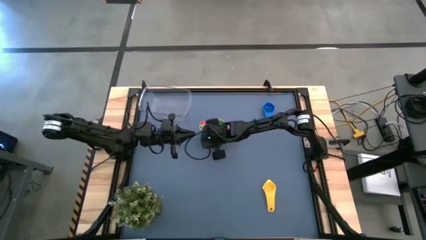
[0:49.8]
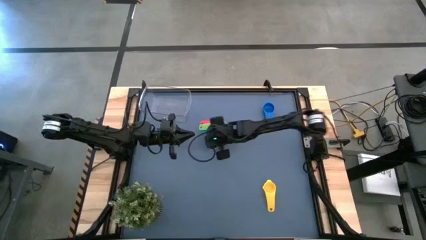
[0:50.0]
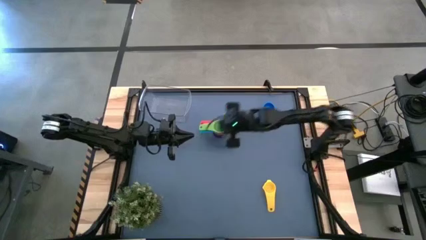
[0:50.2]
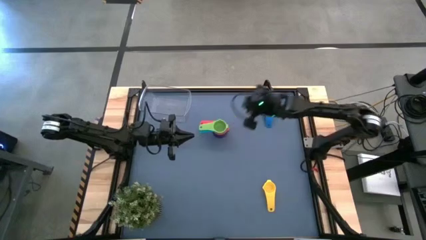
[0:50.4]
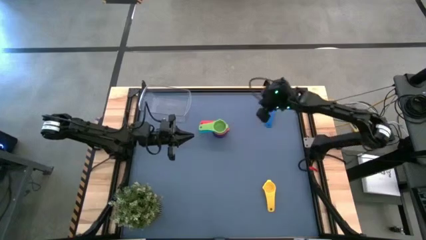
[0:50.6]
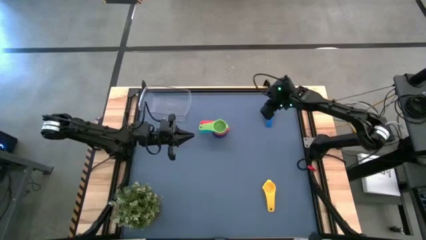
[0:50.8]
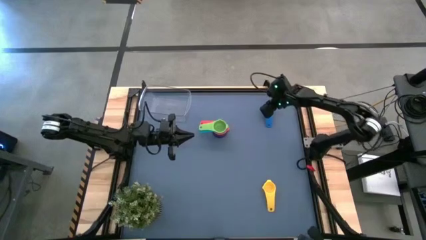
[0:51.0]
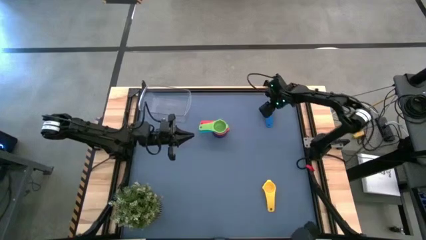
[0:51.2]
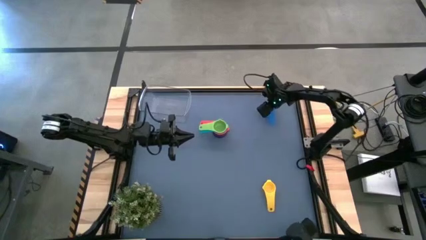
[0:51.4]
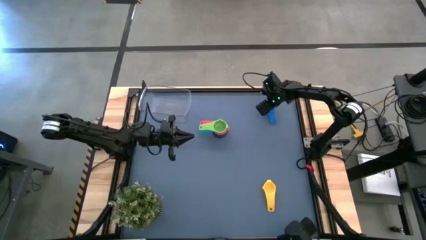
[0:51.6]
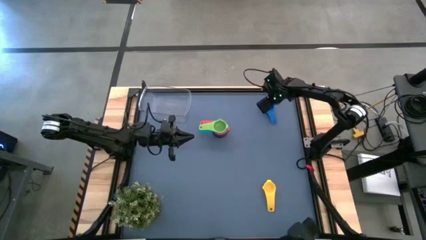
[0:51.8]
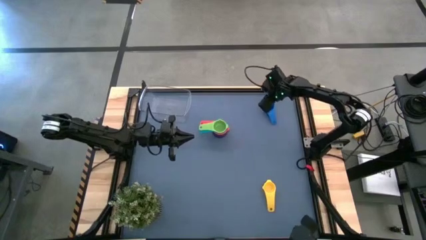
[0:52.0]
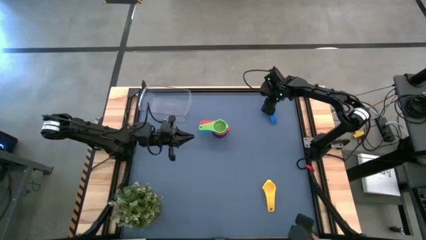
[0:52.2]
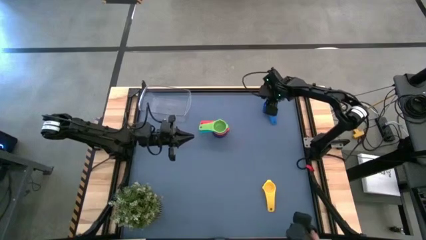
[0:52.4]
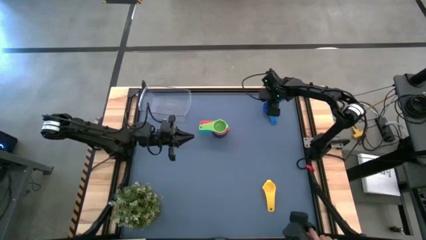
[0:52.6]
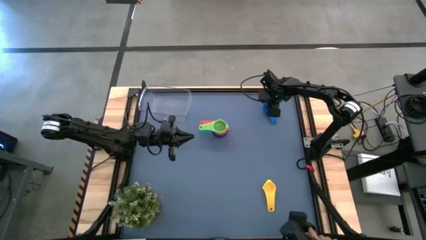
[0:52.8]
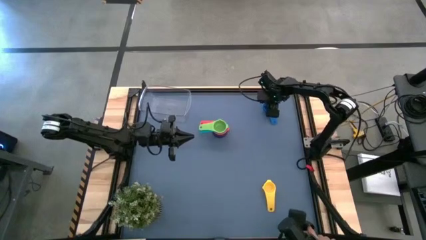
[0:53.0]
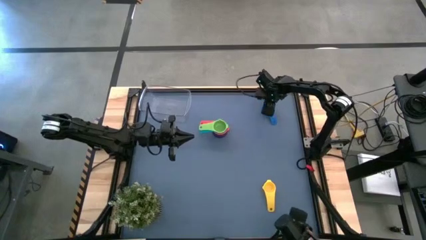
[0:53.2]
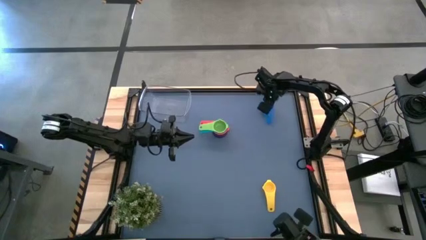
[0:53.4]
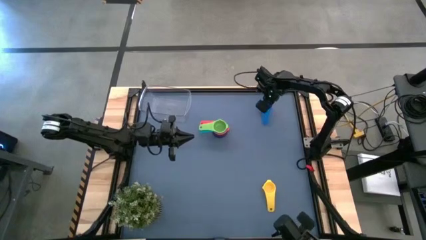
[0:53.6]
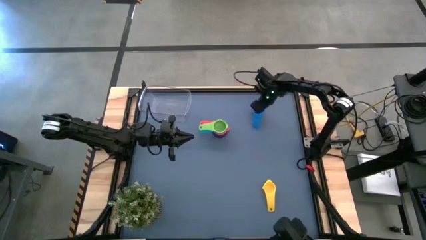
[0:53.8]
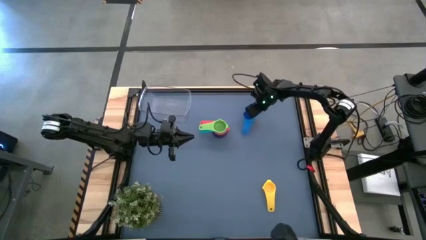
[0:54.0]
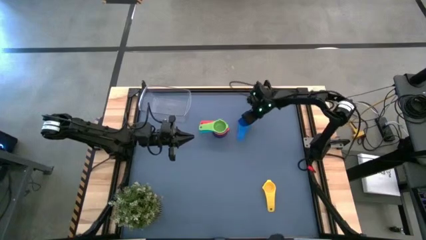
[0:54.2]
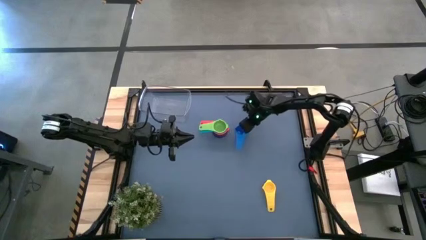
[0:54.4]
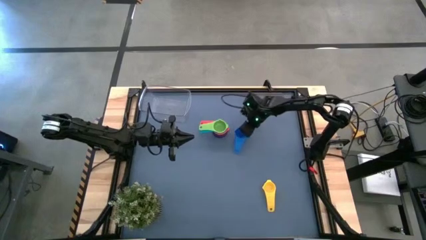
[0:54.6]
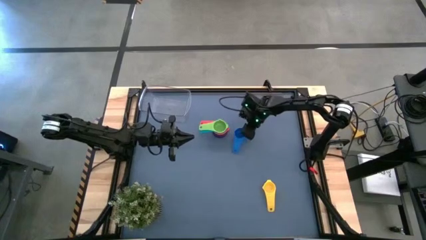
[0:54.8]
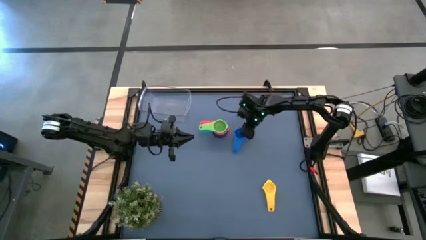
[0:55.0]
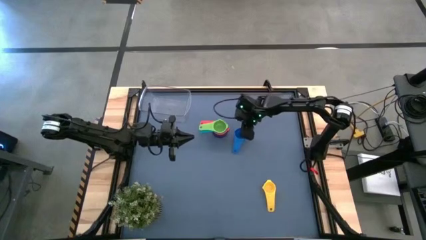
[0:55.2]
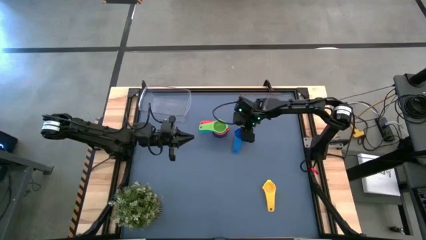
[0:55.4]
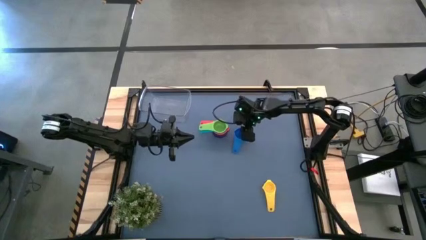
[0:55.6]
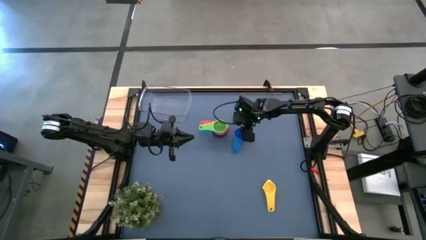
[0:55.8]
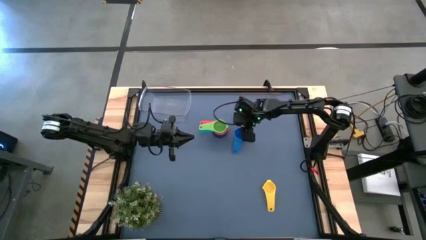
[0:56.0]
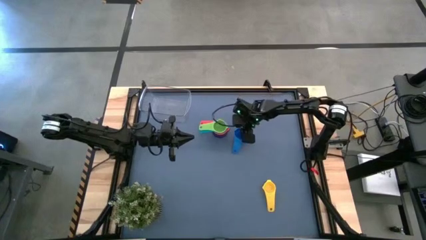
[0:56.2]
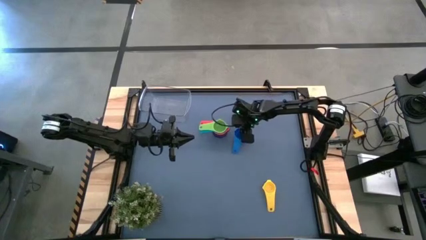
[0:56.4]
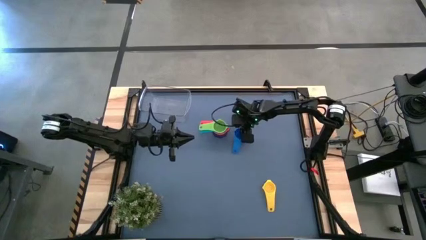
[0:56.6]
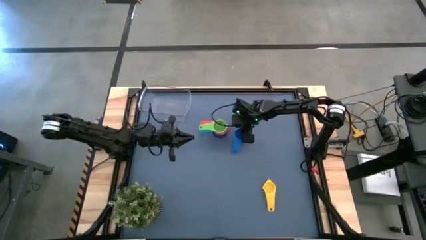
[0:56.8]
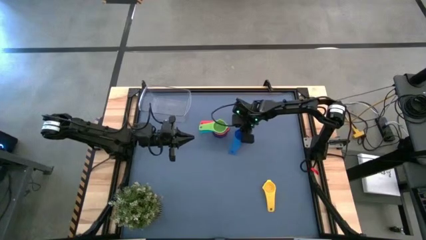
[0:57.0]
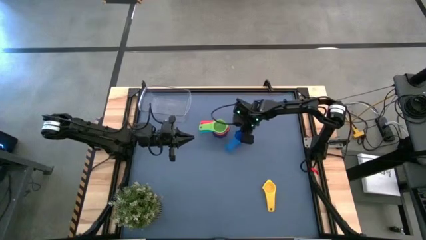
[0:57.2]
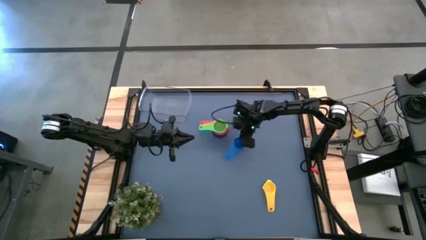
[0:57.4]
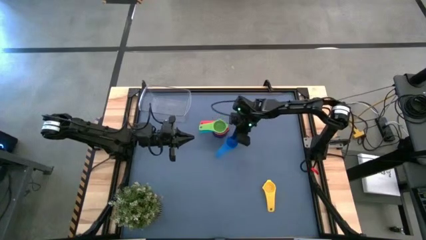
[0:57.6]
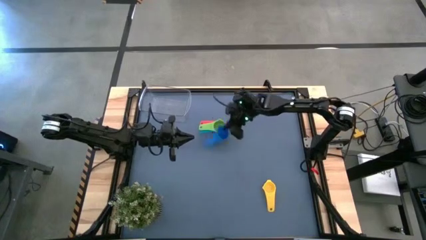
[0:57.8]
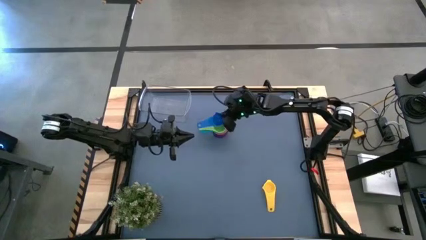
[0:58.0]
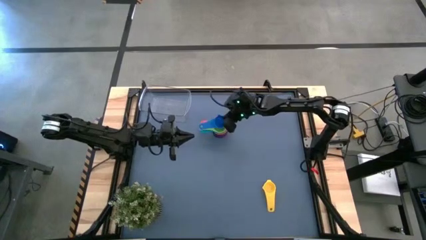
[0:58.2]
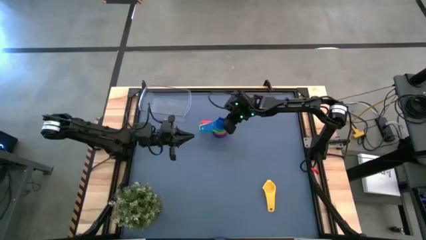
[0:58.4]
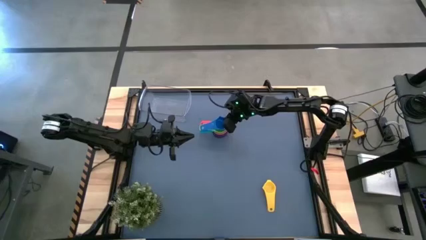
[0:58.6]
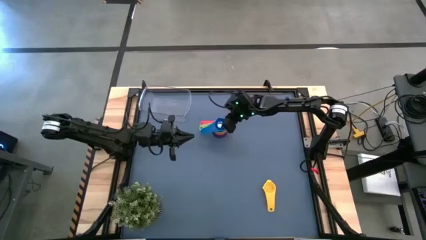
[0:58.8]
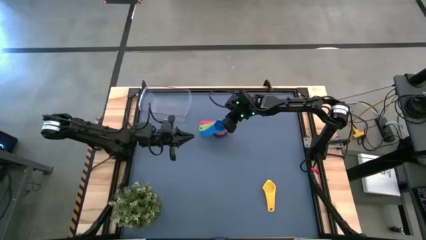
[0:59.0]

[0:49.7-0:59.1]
Task: Nest measuring cups in basket
Stack the blue measuring cup on top of the green measuring cup

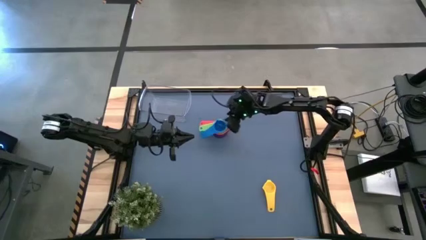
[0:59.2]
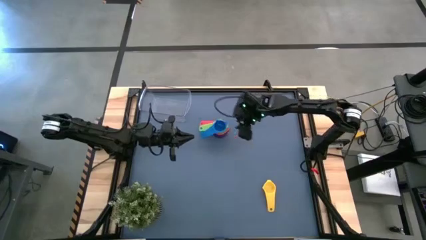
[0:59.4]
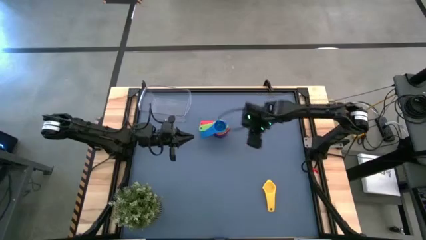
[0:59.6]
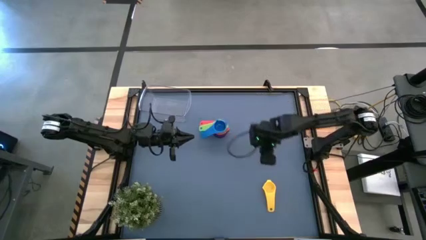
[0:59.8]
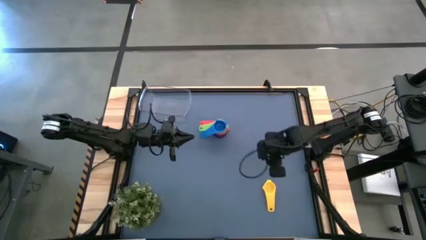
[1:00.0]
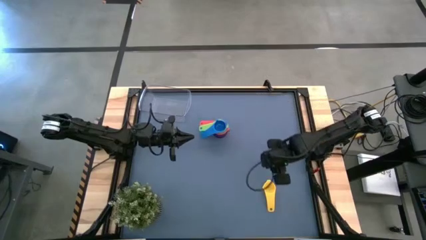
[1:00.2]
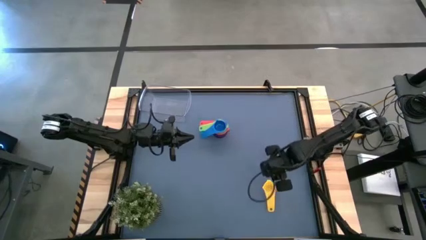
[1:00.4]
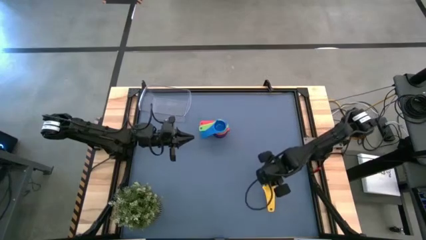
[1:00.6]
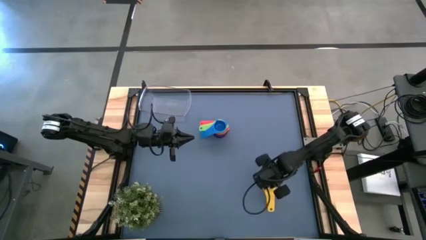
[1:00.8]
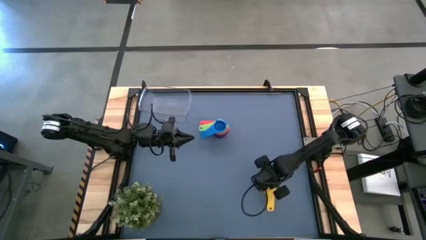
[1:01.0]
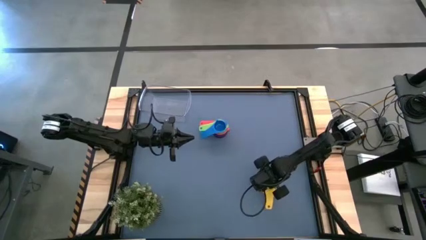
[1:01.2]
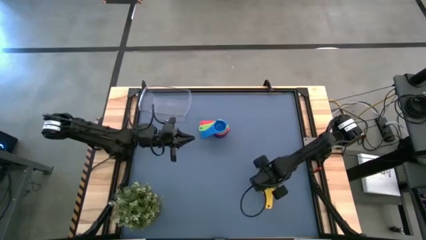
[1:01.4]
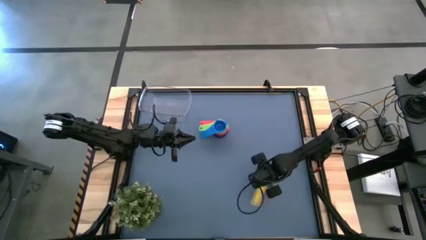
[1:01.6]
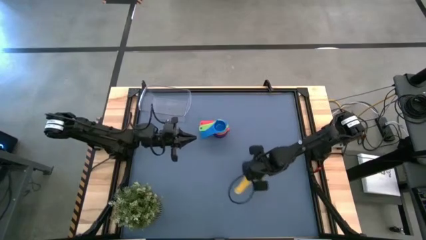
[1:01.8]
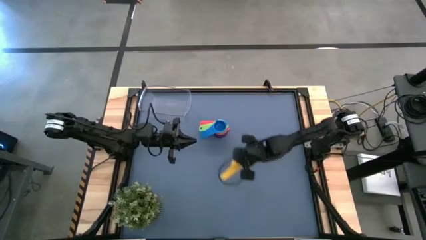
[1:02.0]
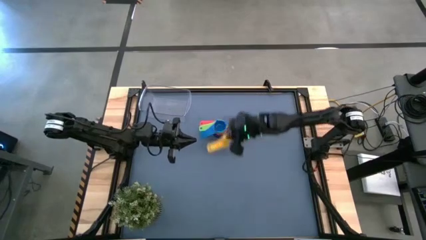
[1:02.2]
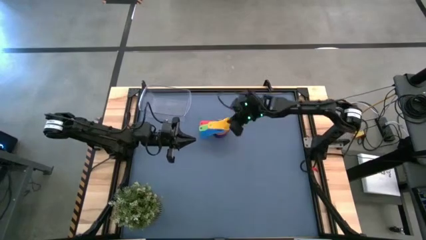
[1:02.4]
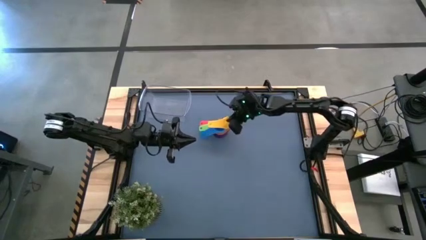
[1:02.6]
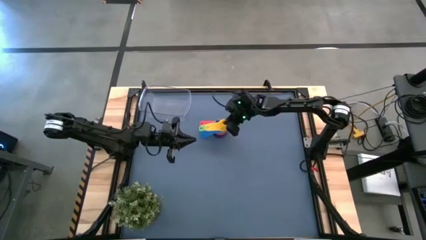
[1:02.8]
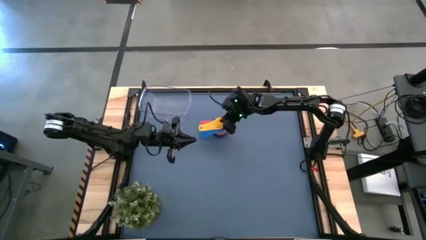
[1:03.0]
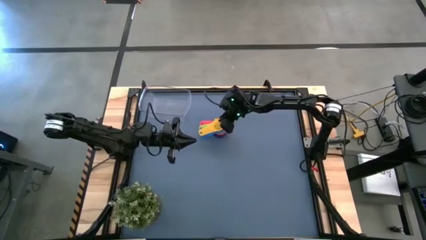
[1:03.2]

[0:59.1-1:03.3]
Stack the yellow measuring cup on top of the blue measuring cup

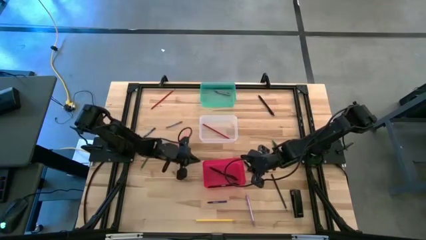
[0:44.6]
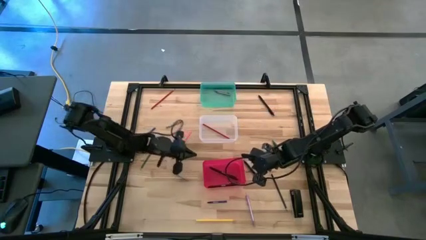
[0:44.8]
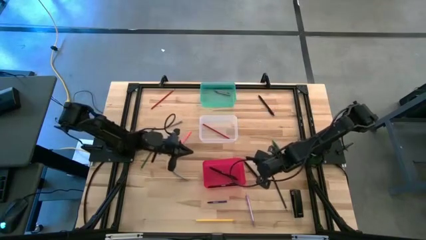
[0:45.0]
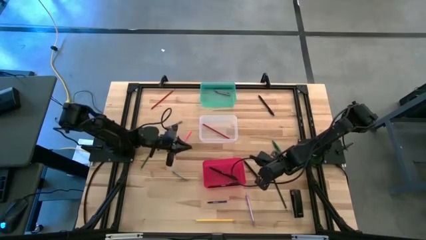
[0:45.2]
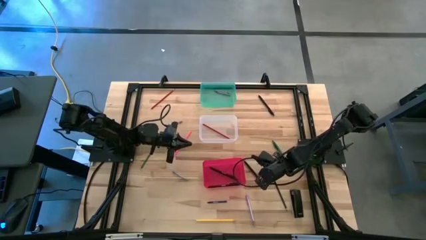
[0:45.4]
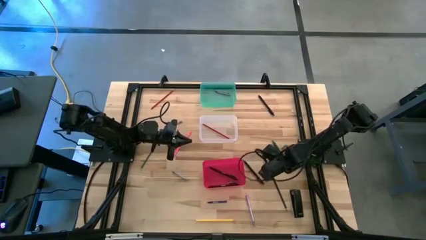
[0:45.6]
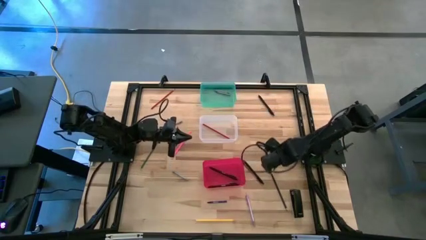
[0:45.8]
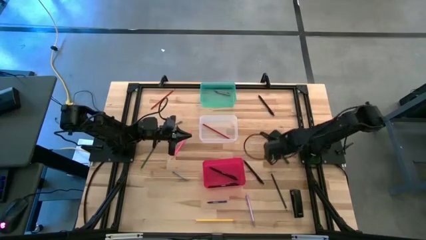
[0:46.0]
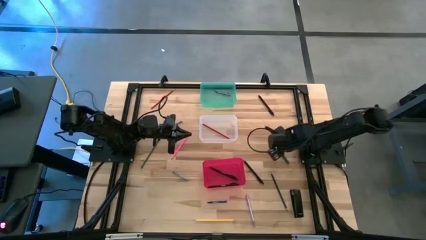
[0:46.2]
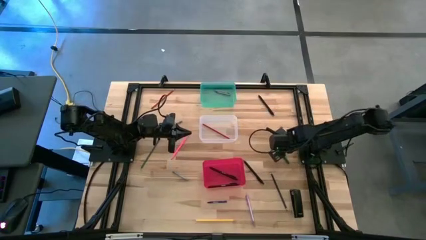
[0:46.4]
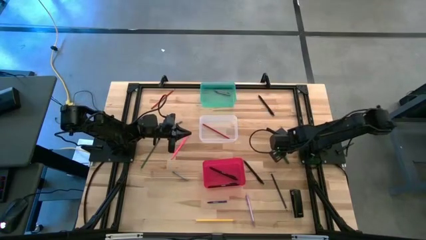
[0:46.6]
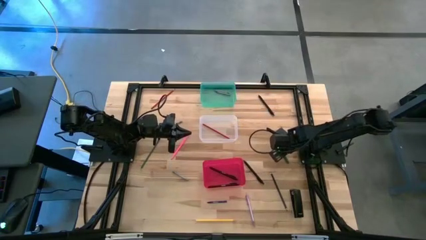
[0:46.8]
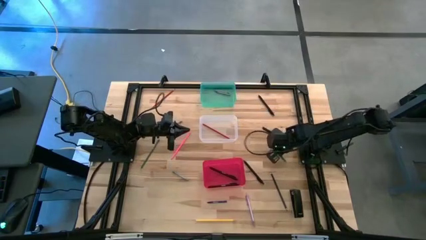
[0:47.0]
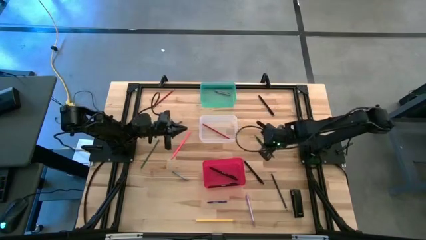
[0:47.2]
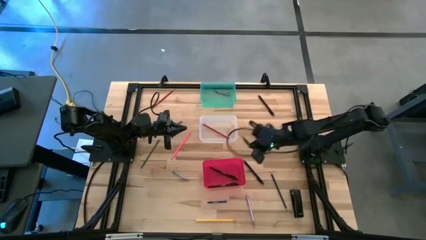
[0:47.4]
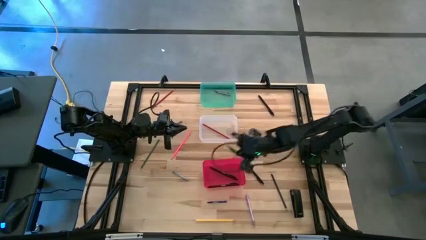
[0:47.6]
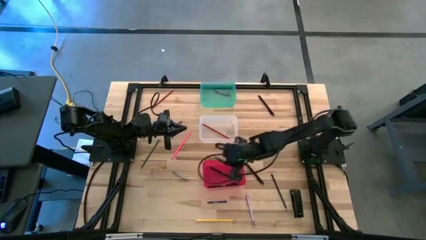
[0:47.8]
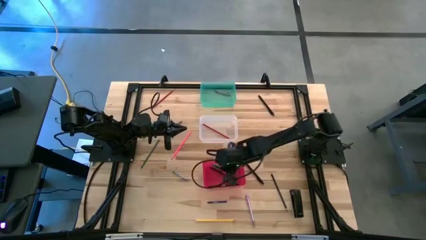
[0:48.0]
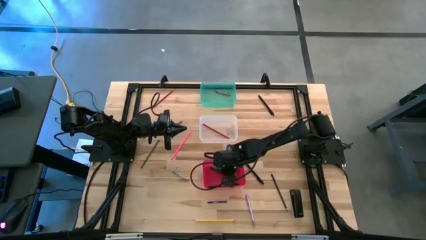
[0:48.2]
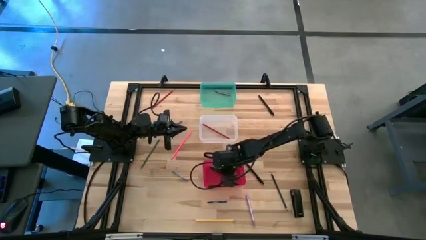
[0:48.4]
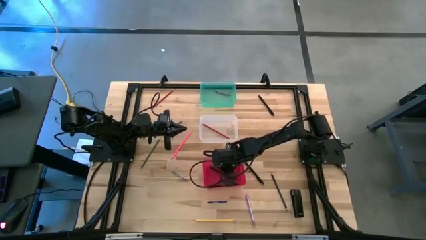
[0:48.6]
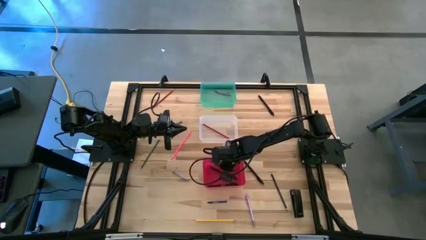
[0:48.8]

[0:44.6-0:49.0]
Task: Sort crayons/erasers/pens/pencils in bins
Put the green pen into the red bin
